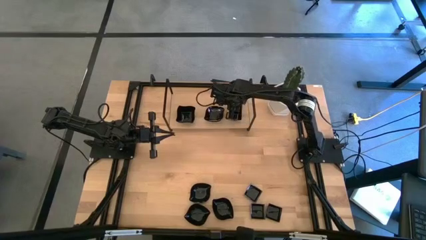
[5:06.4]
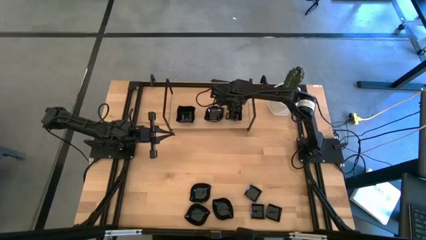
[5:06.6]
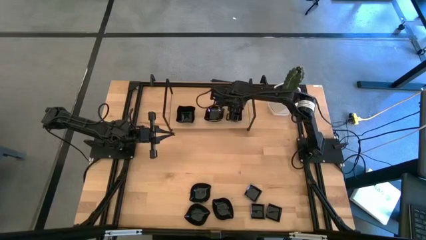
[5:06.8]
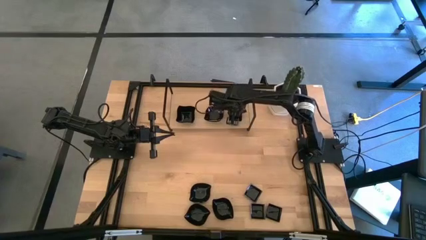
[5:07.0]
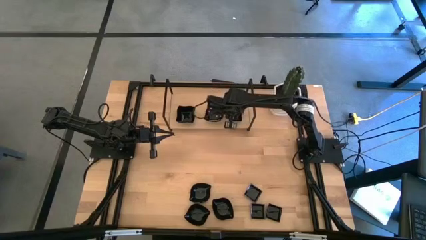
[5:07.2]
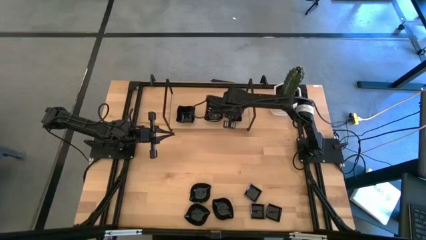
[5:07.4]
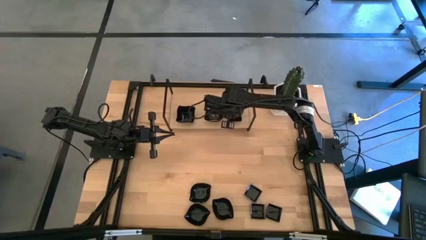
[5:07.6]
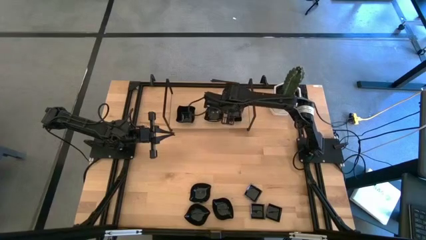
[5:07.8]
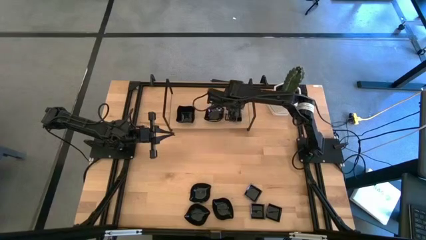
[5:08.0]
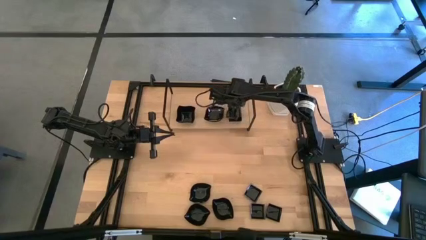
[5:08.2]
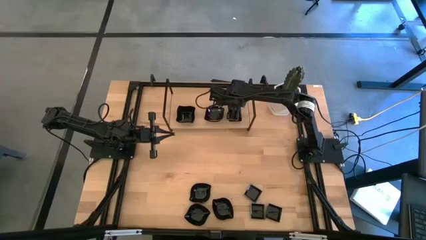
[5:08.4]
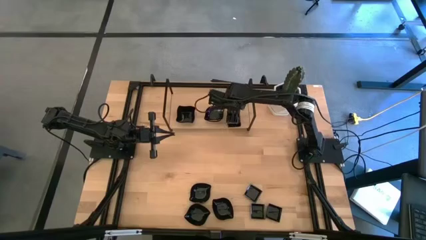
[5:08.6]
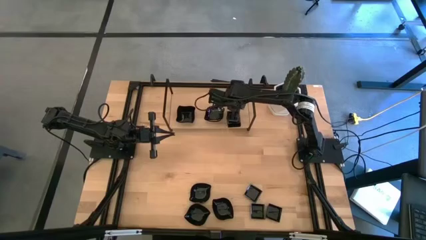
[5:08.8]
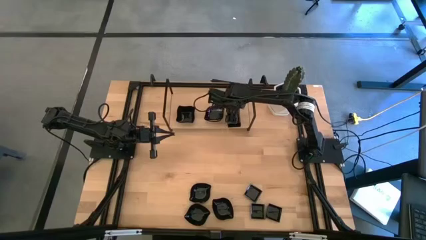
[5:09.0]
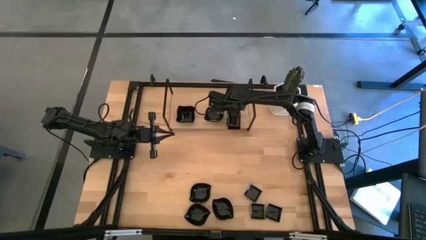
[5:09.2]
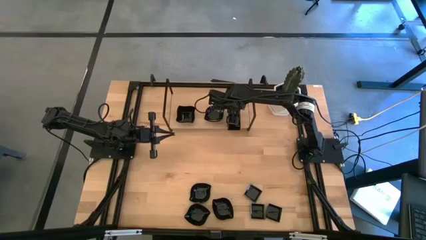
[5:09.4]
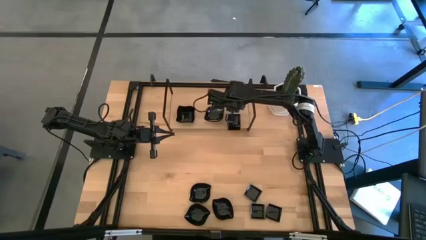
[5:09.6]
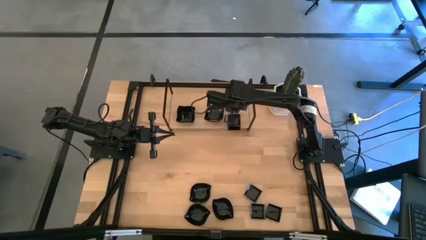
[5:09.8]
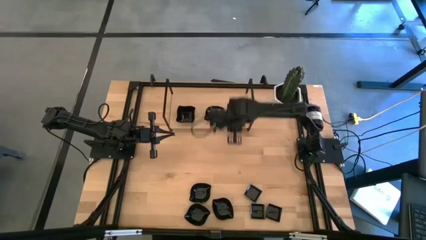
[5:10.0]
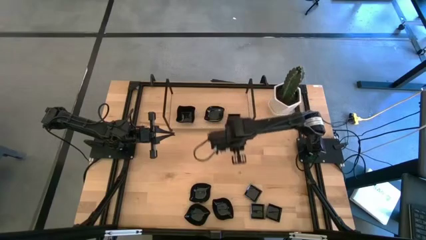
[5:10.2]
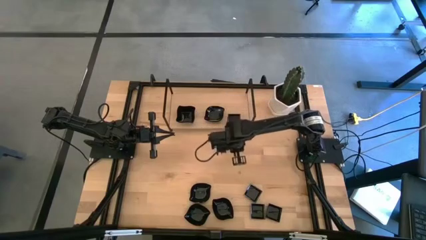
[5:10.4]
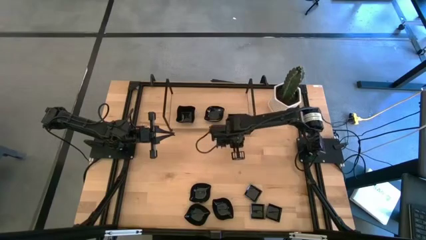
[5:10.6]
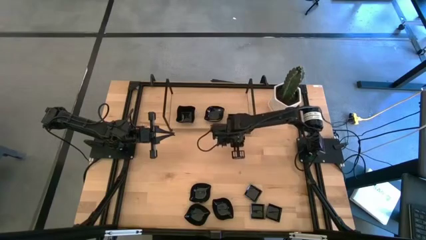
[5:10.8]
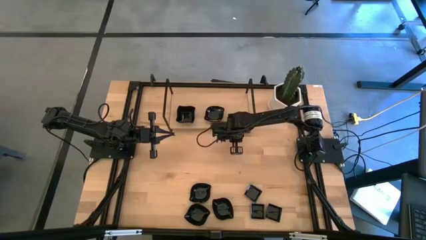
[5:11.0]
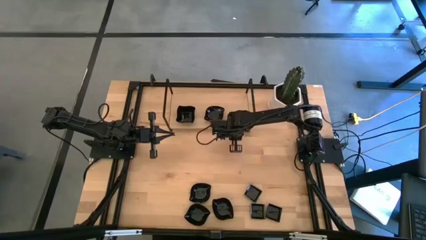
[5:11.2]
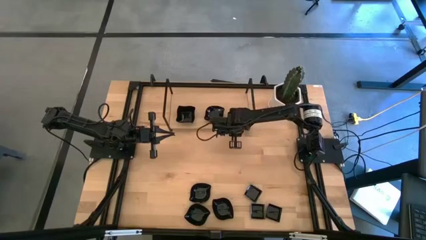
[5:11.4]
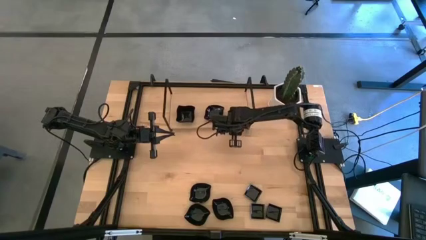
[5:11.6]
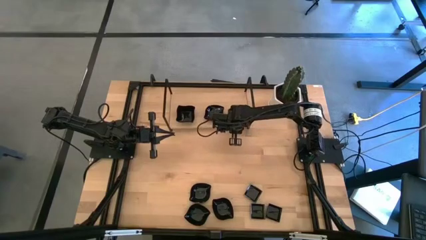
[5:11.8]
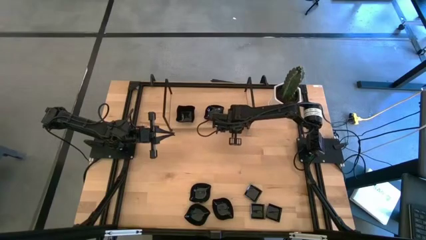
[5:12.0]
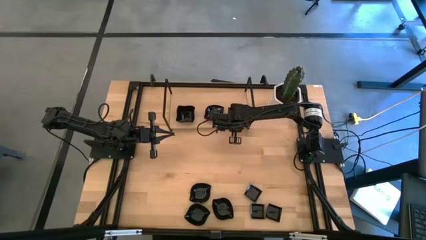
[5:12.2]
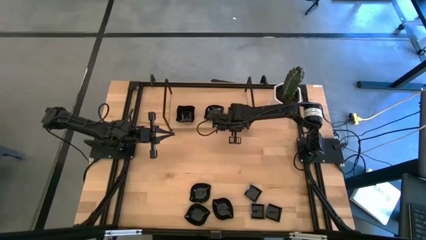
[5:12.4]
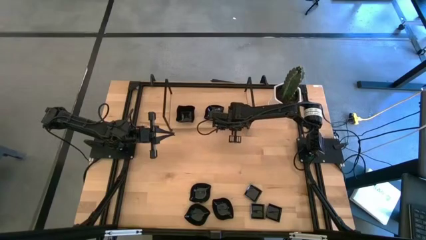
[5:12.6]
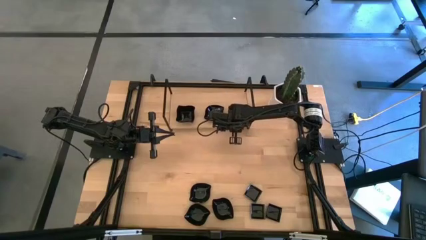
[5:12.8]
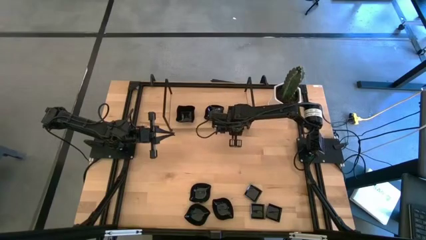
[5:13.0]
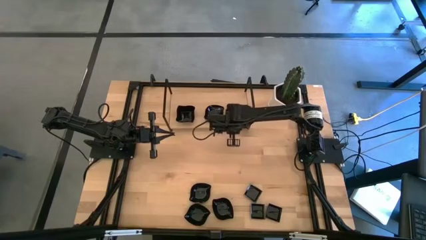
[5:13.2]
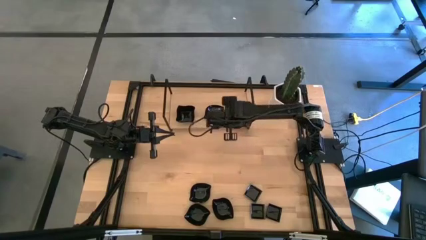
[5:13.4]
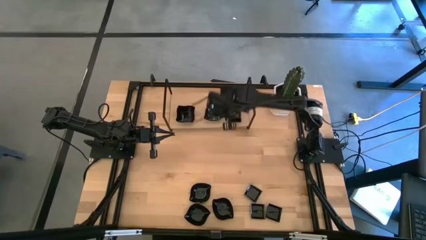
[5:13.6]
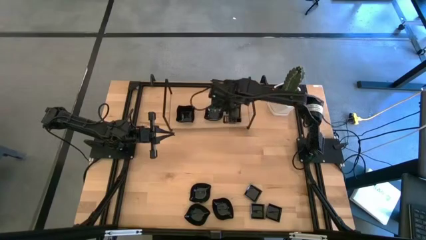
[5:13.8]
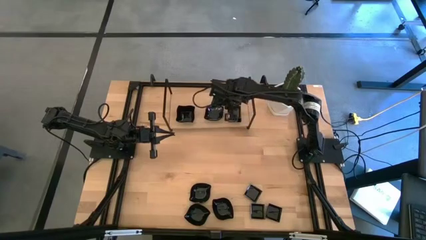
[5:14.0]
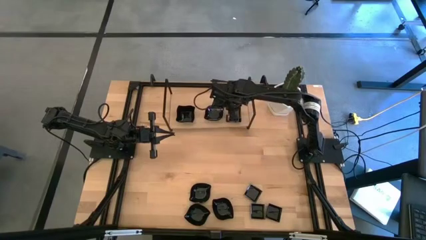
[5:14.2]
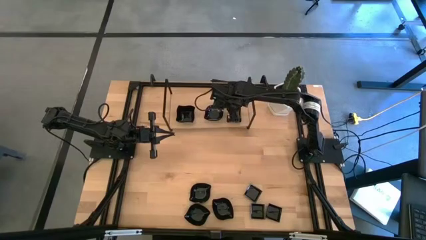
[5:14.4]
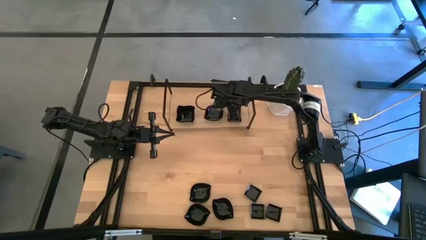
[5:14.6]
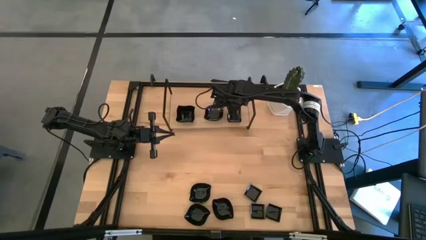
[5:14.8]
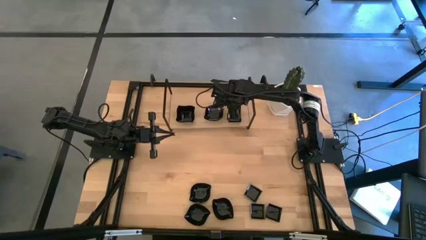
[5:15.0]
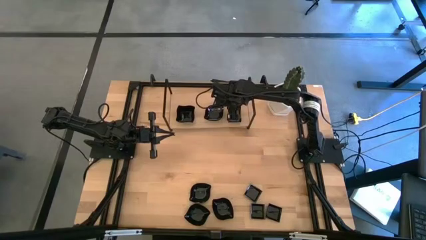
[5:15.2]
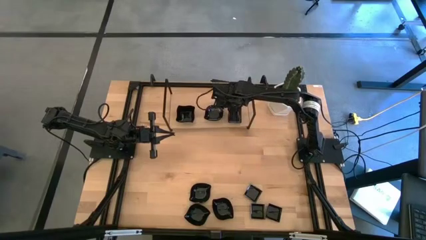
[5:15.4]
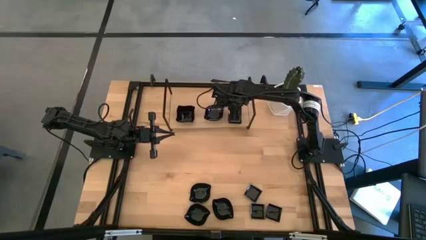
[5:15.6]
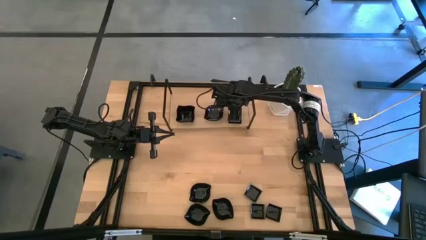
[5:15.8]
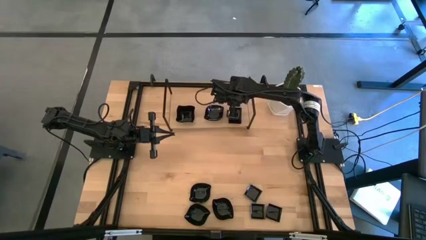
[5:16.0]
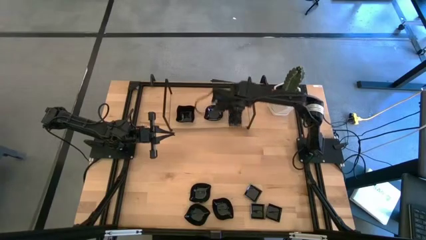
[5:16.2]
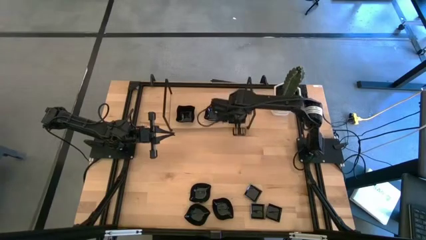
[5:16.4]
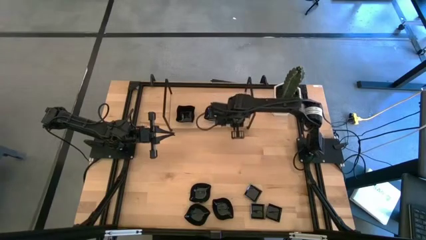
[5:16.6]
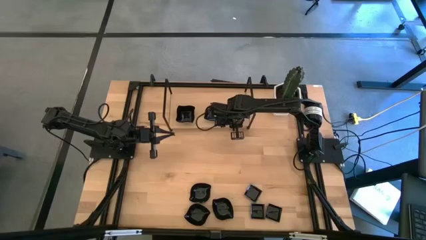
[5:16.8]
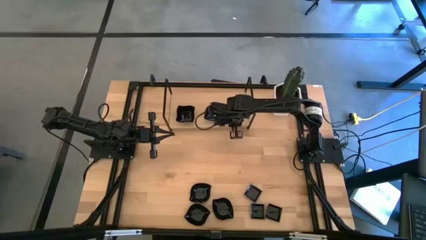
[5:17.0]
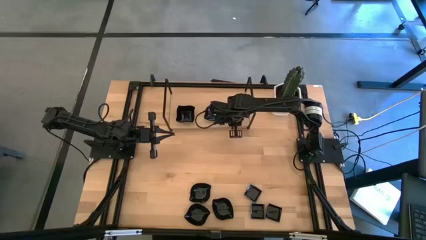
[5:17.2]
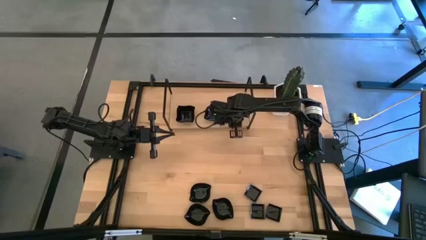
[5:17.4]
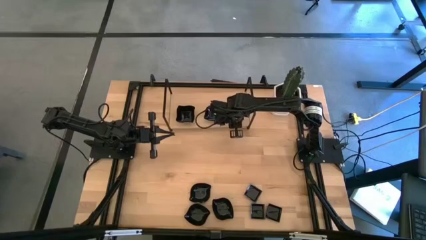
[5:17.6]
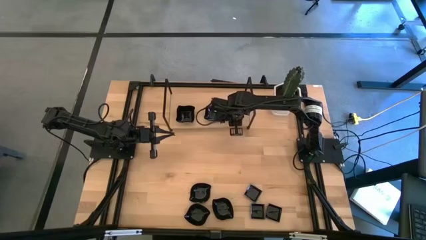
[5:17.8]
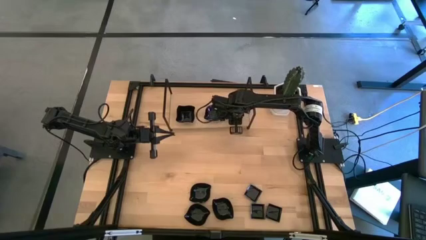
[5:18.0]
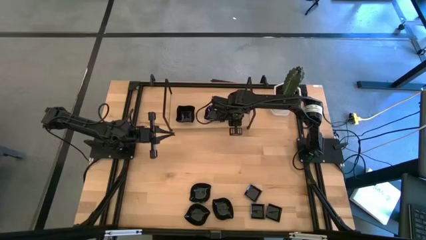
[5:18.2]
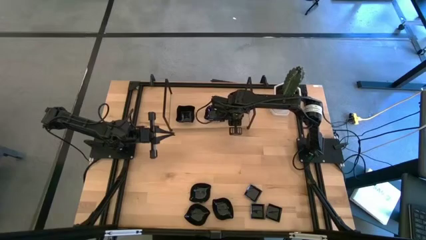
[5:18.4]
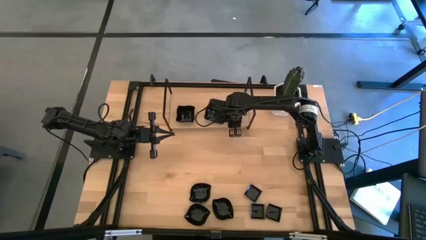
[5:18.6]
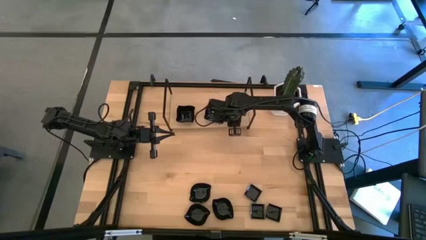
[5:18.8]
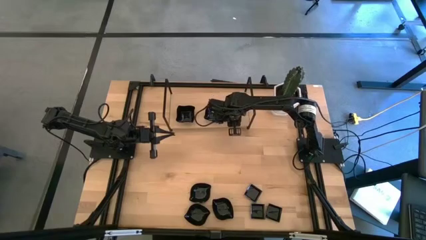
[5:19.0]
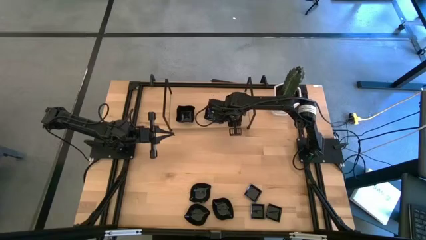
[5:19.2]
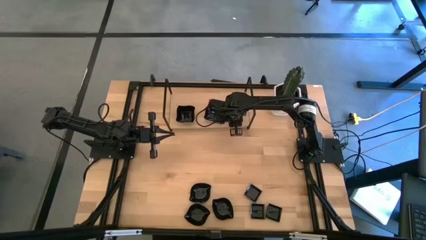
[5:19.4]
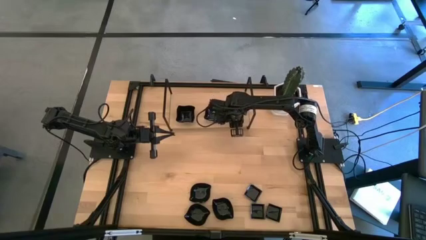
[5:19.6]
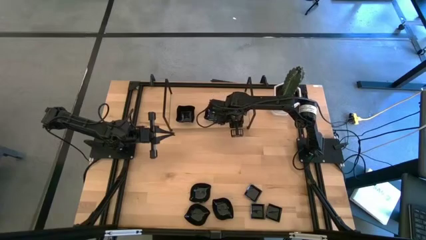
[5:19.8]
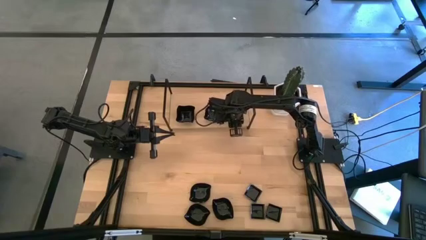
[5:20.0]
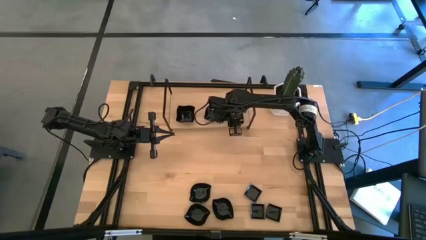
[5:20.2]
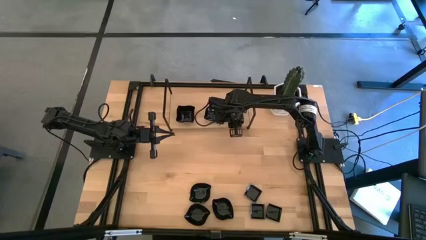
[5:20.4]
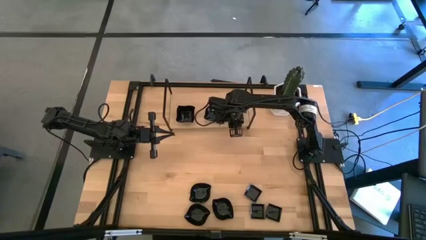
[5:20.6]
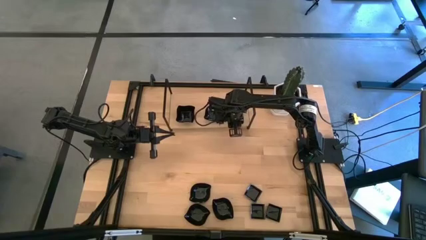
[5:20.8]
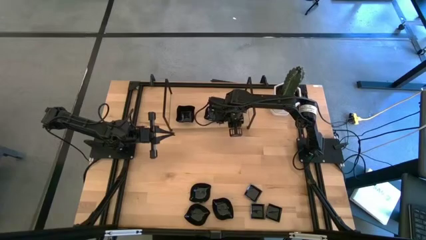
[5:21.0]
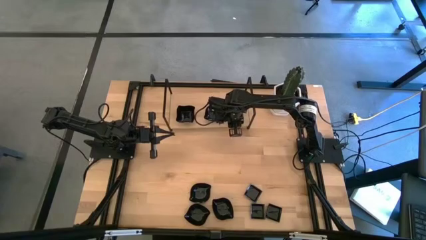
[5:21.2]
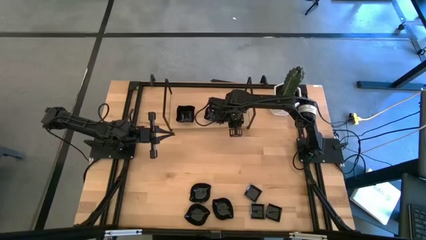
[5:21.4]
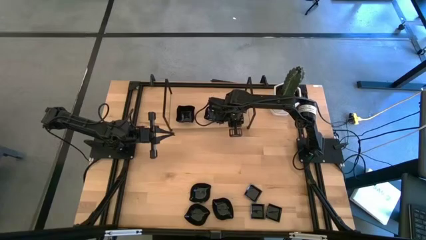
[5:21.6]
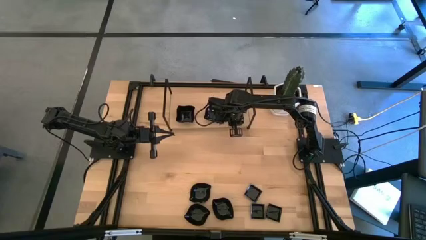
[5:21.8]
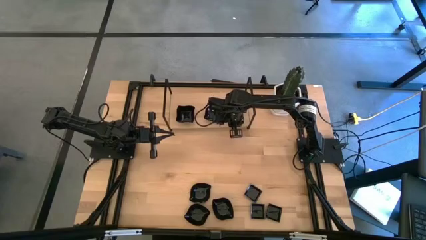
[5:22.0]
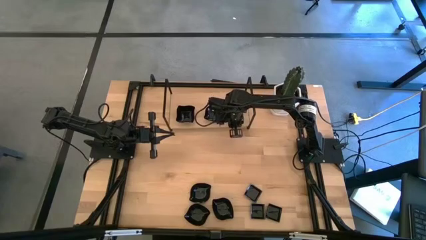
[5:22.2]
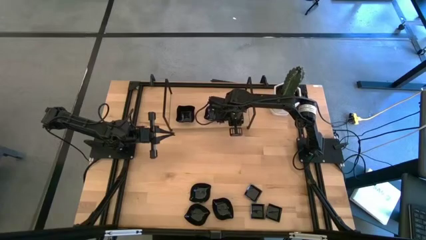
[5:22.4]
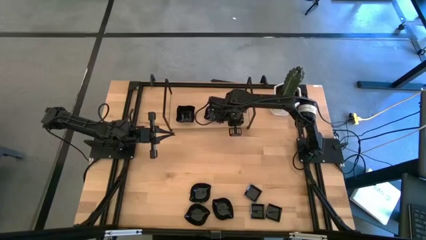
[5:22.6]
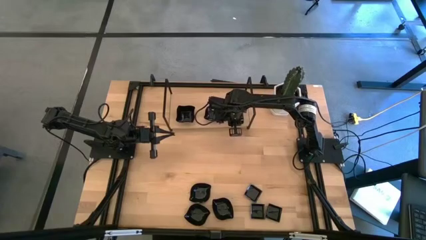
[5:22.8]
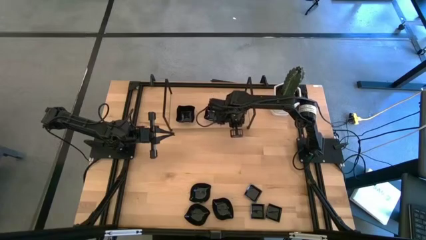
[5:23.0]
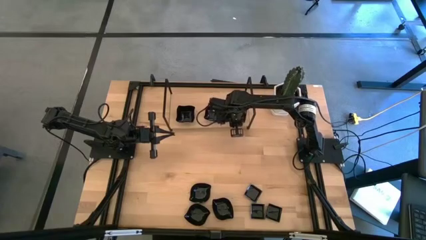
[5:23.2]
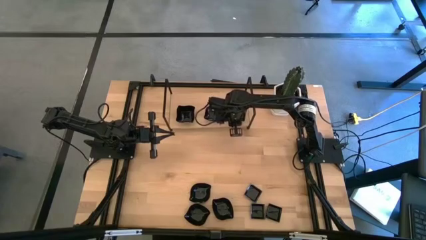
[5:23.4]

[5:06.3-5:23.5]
Task: Pick & Place Mini shaped plates
Stack the square plate on the top of the square plate on the shelf
